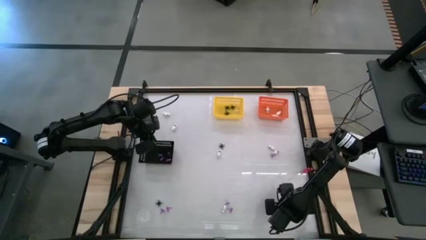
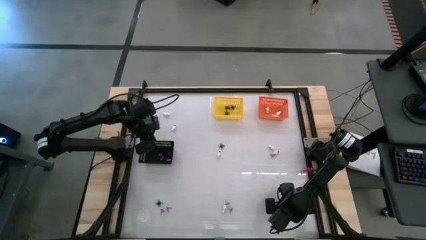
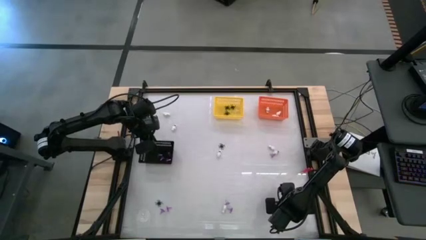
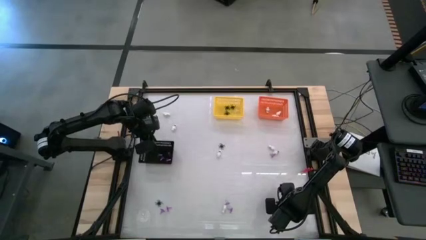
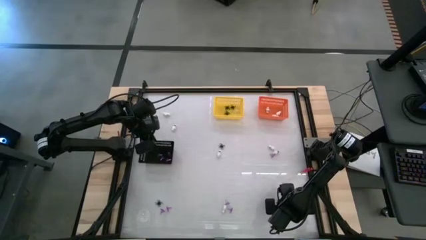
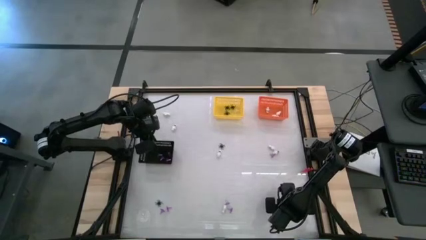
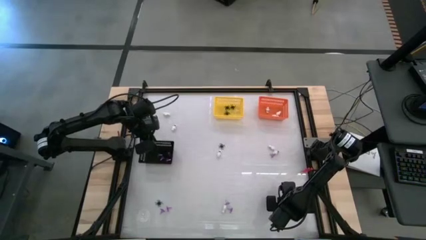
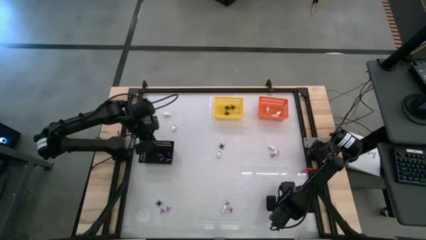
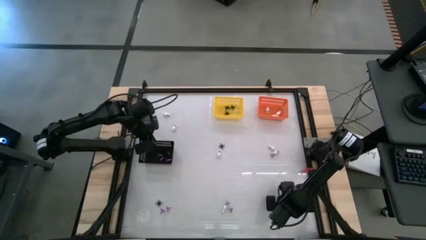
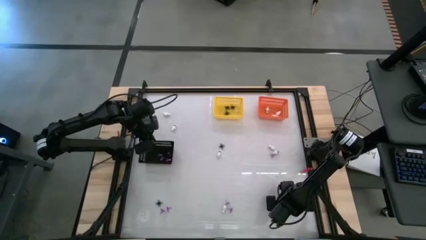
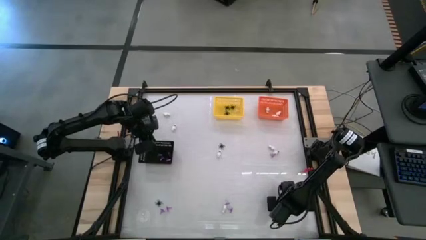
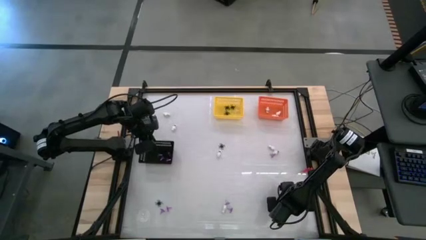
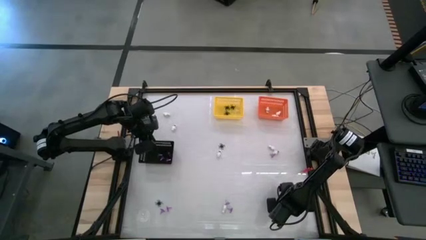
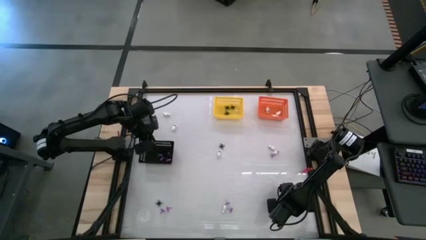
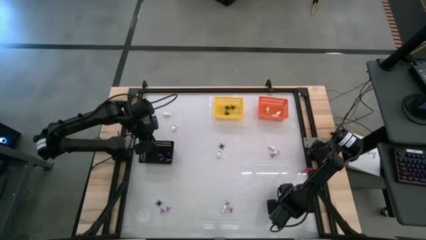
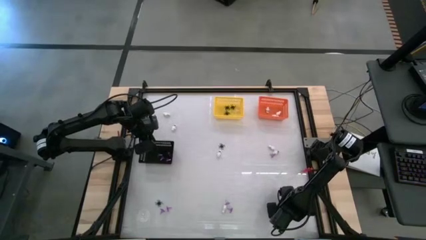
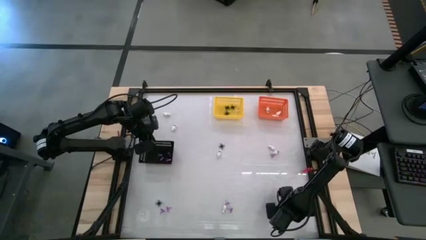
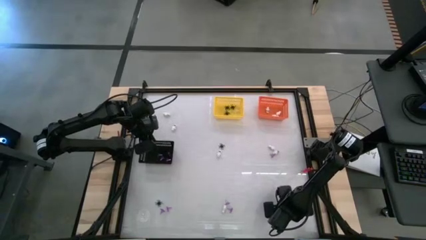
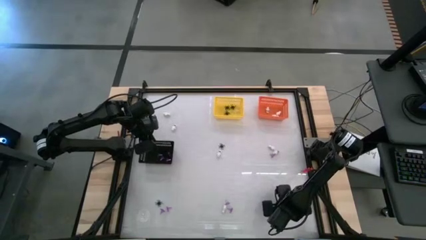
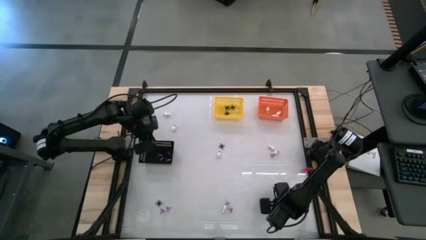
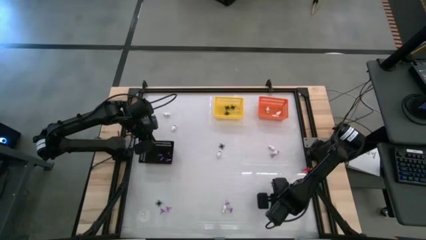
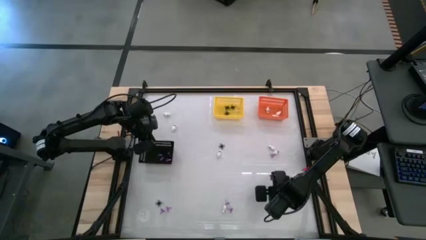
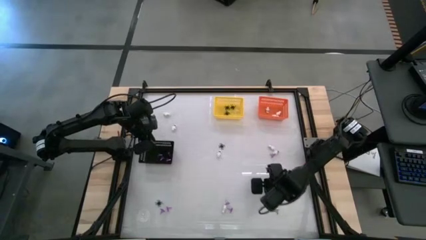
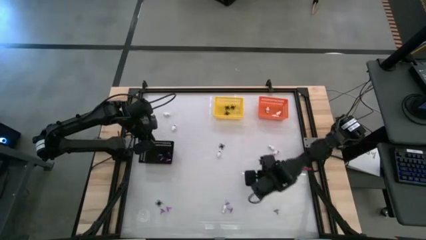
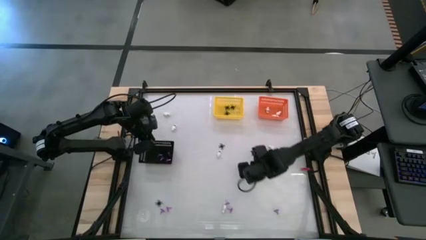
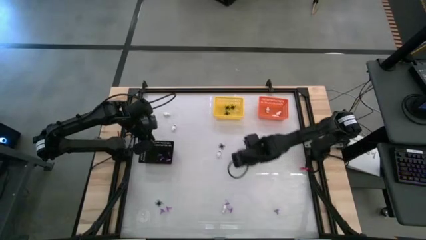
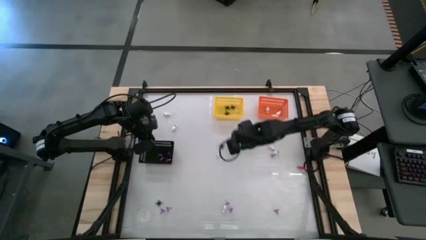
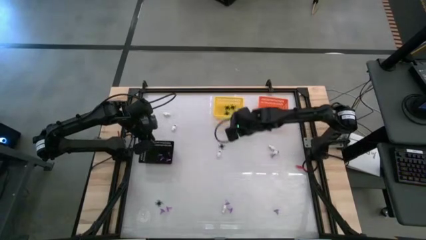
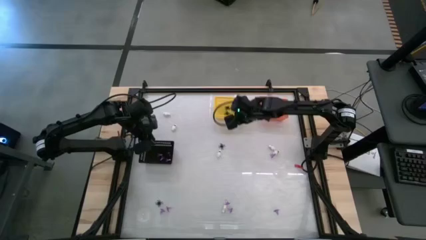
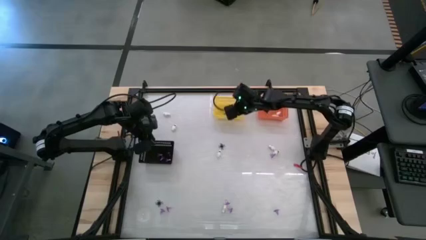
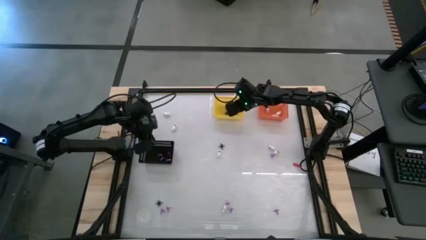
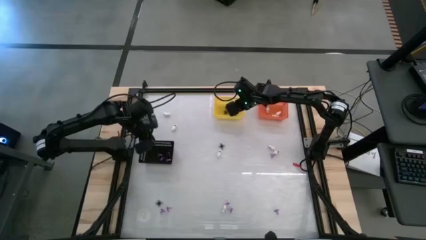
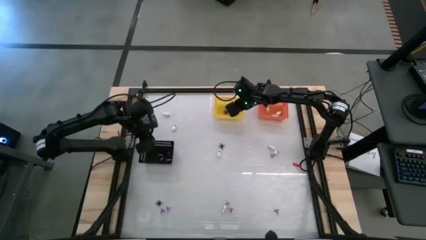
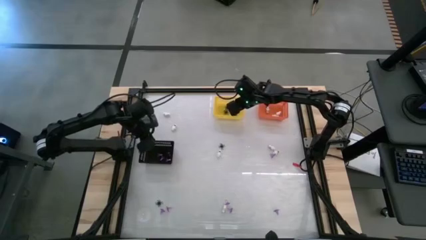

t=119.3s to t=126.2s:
Task: Sort Halloween decoration
Put the black spider toy into the yellow bin

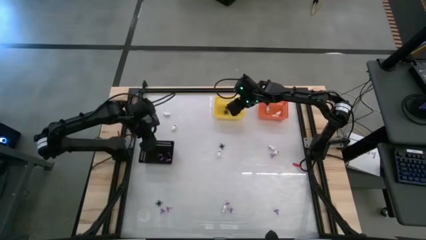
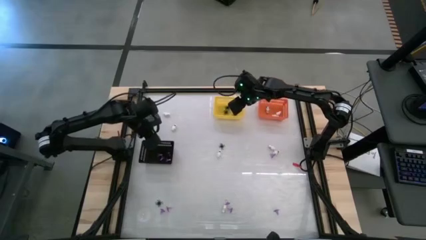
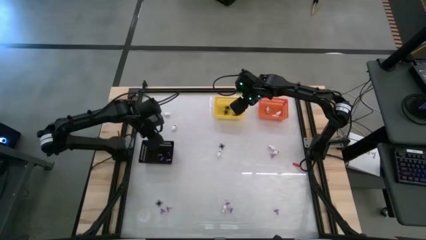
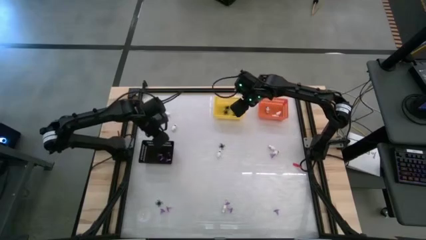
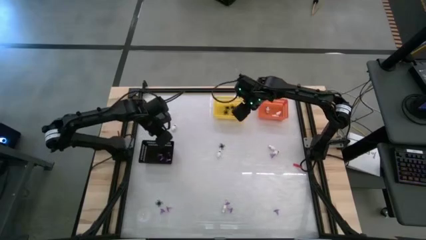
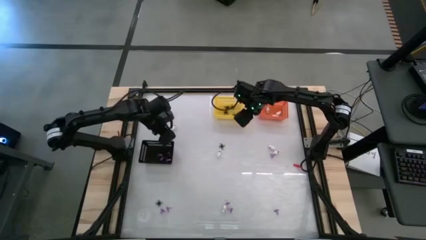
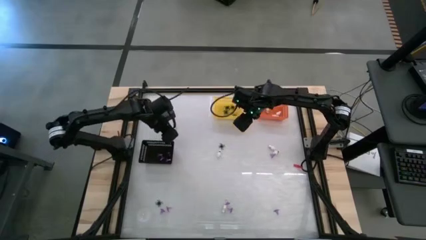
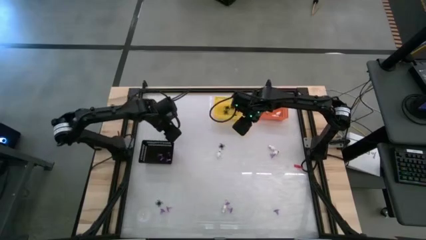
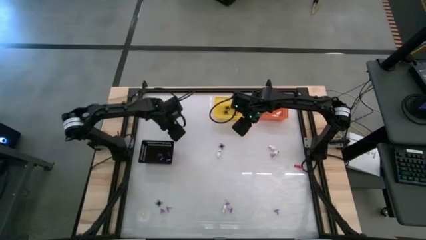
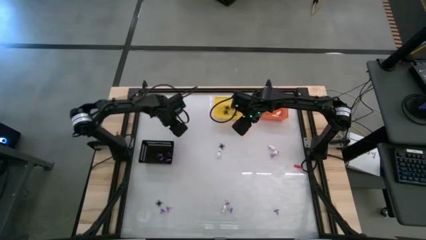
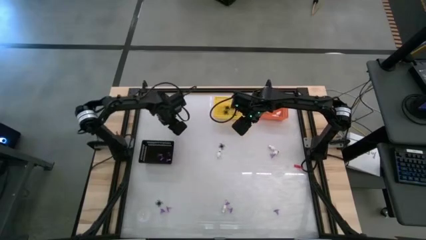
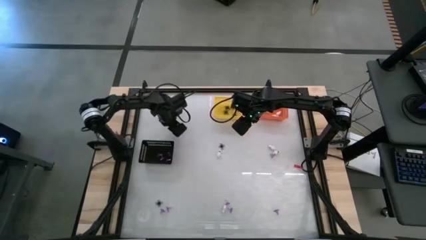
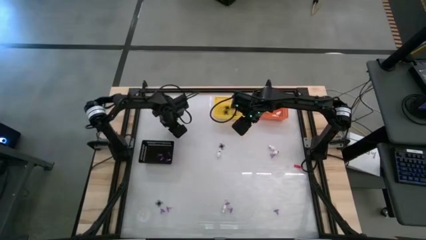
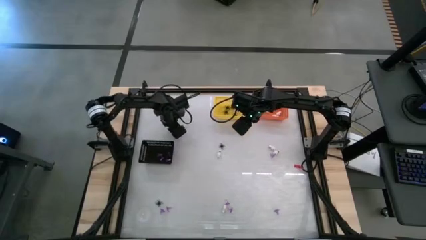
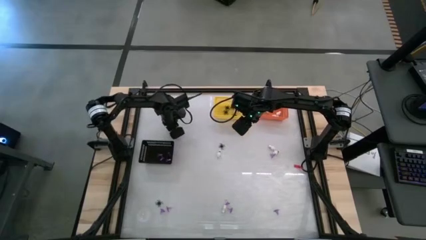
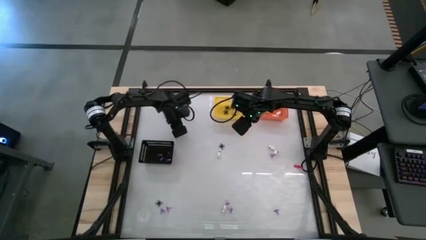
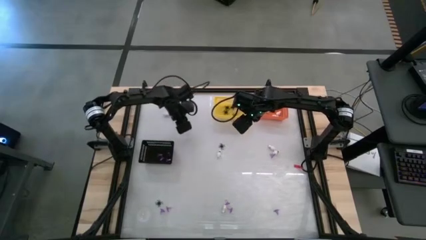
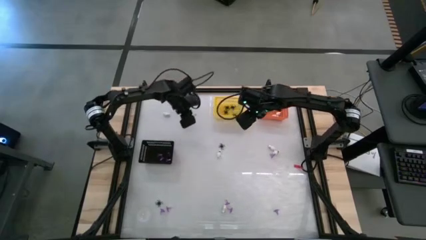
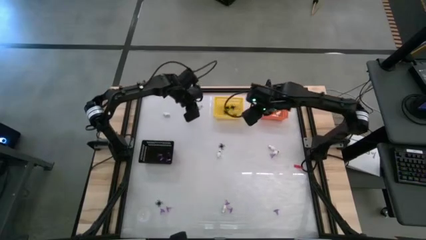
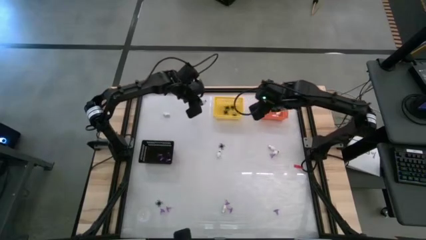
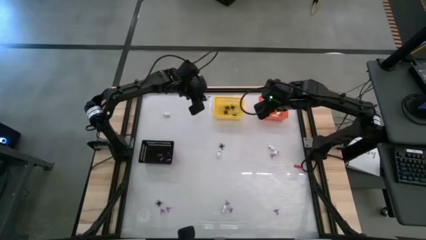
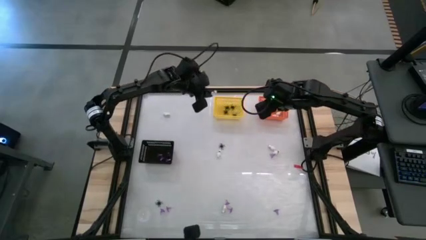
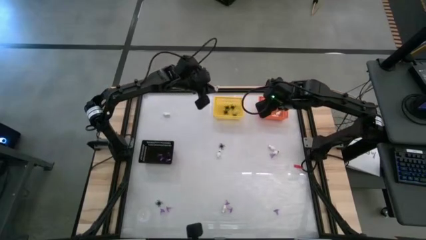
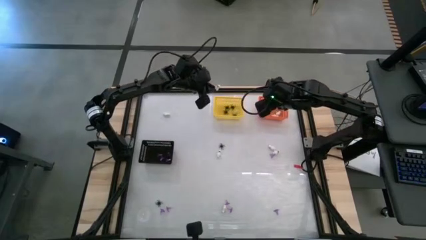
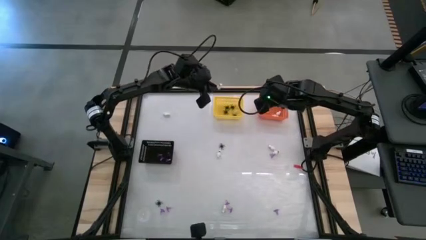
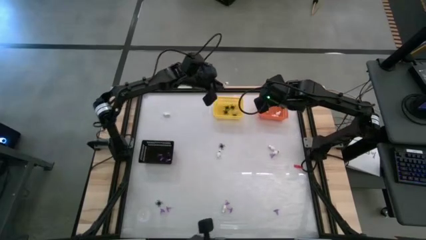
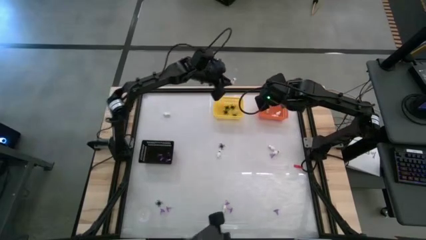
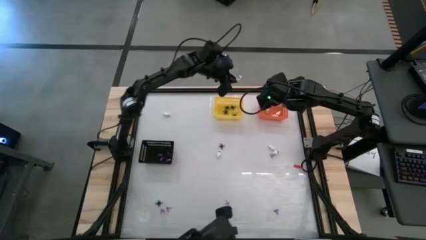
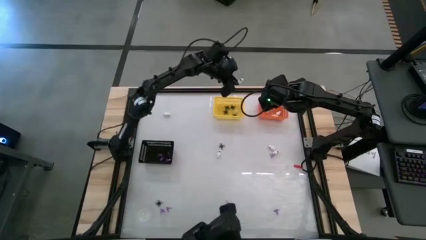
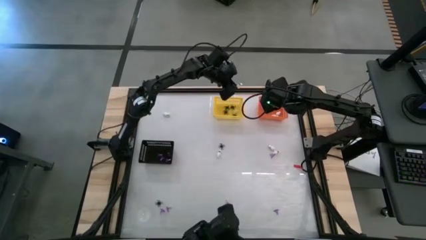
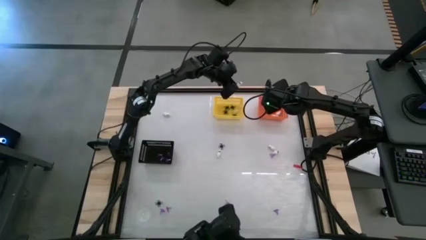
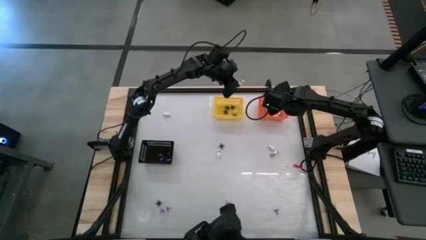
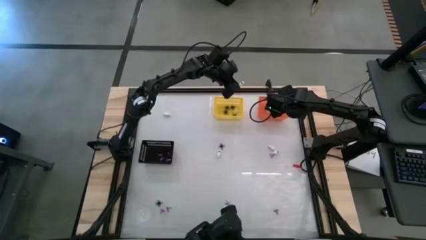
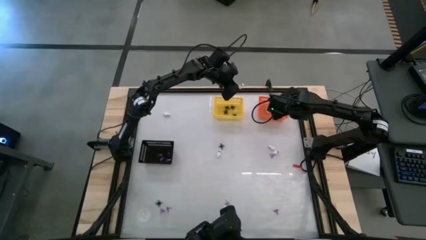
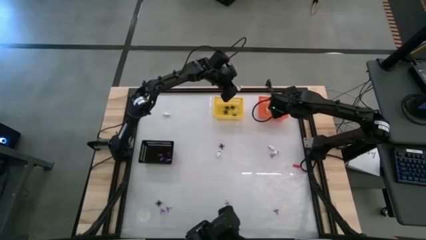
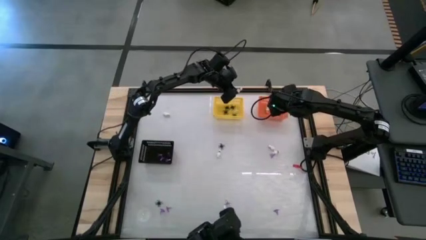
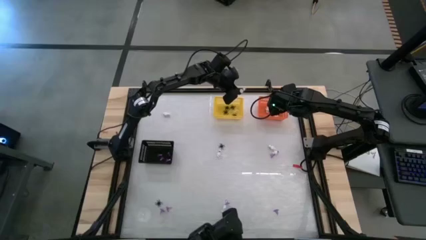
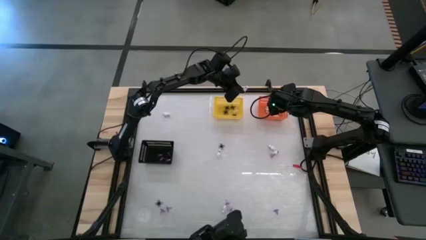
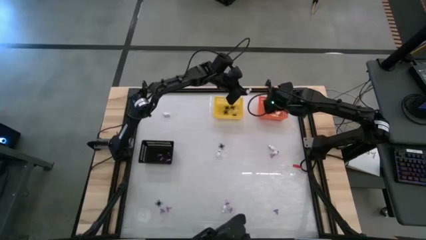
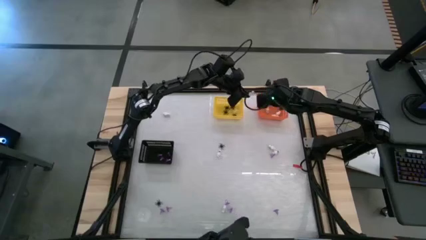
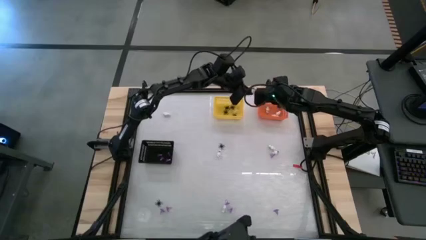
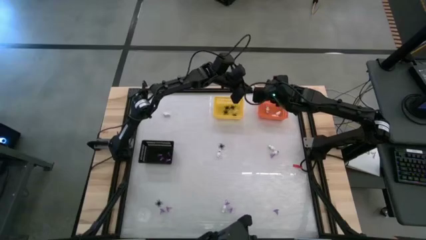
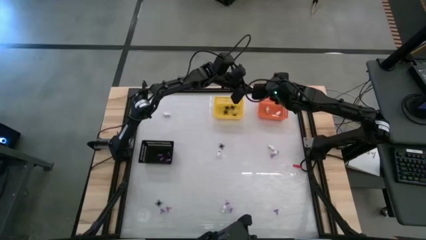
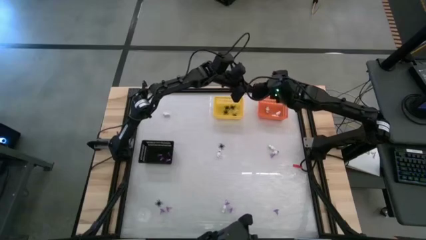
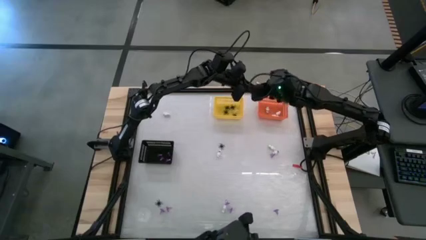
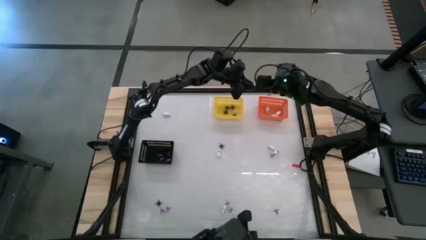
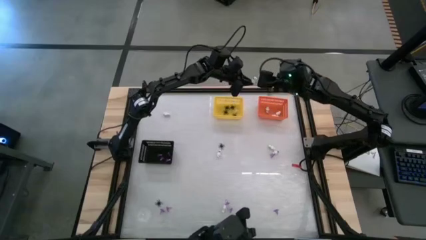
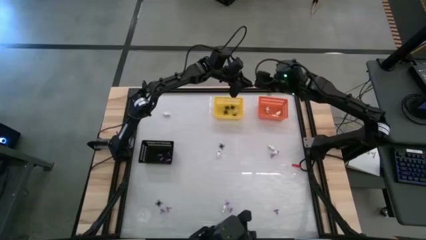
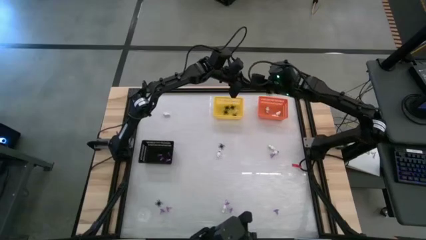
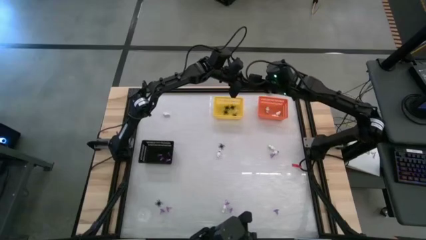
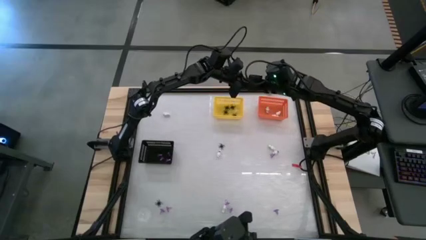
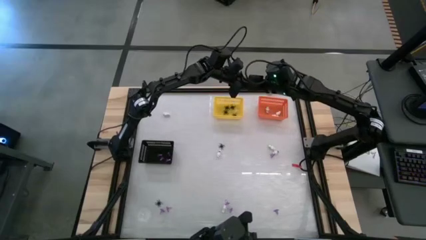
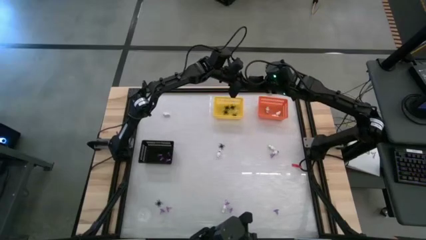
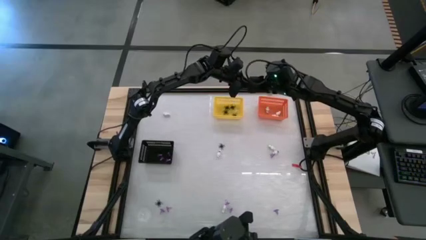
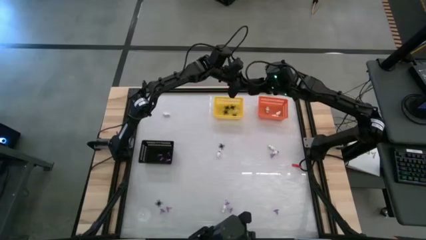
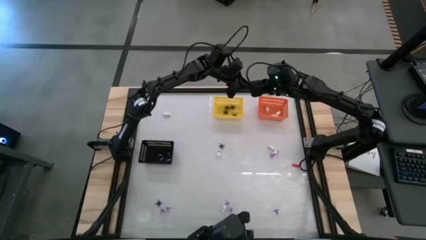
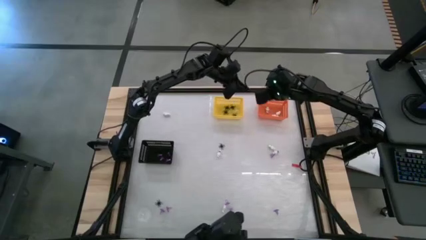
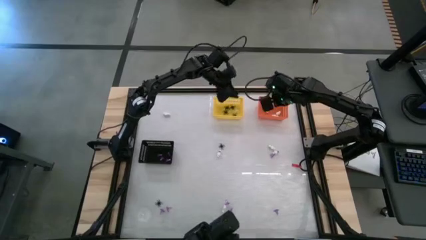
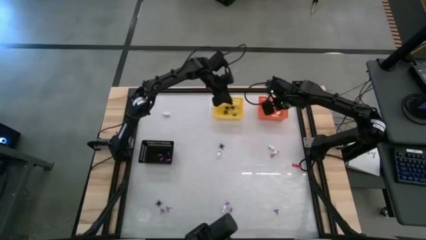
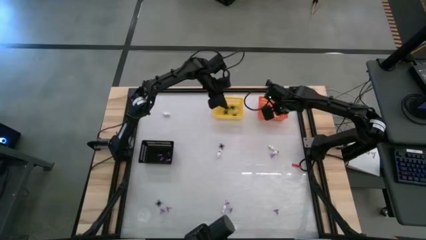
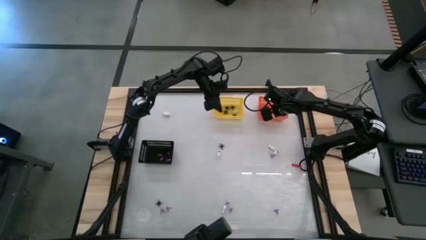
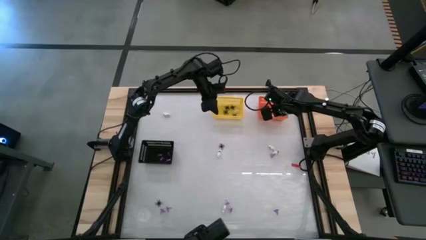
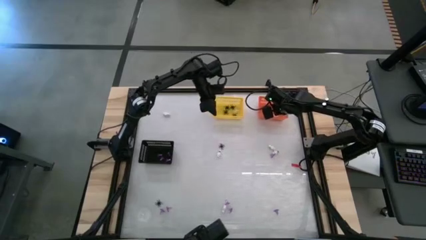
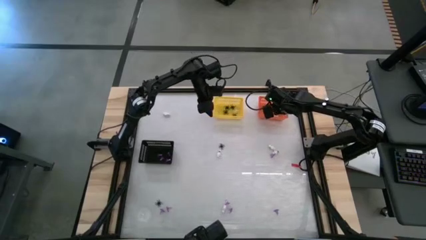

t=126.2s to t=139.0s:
Put the white skeleton toy into the orange bin
